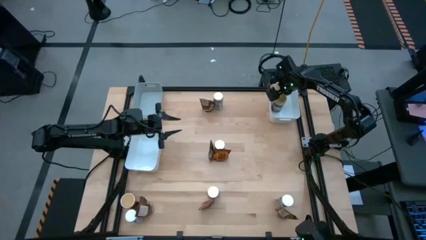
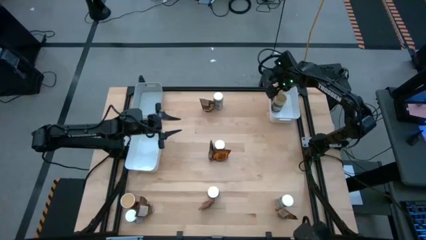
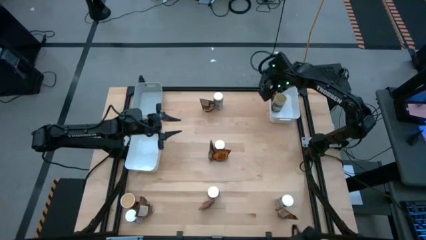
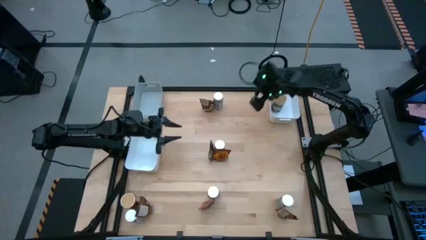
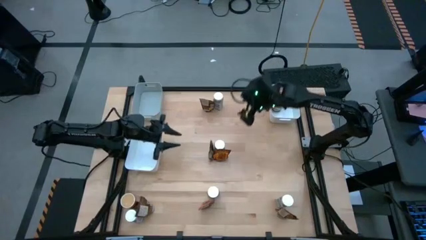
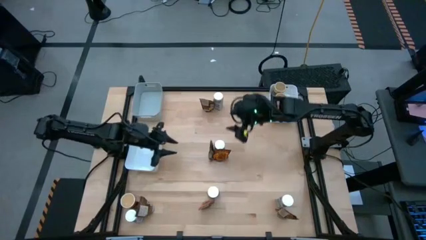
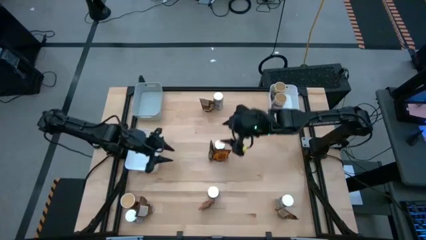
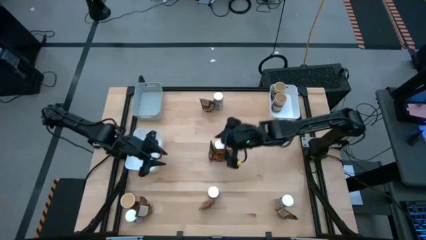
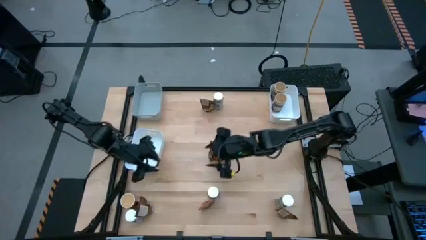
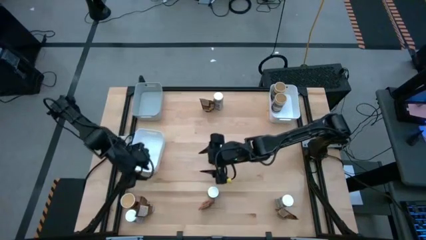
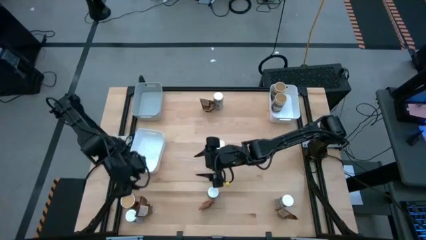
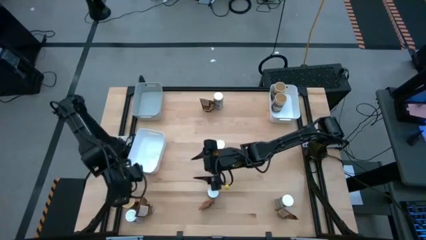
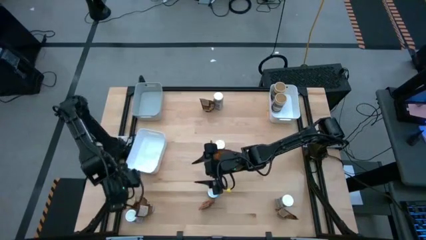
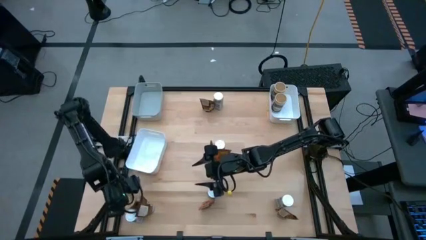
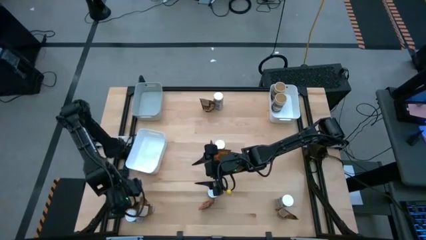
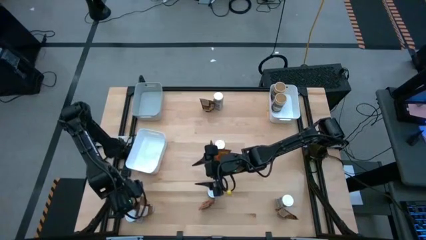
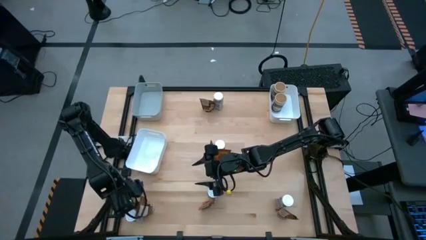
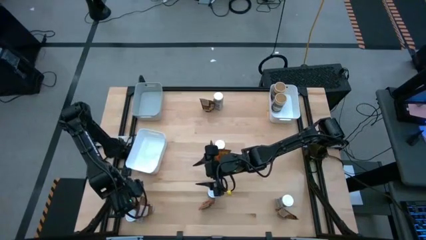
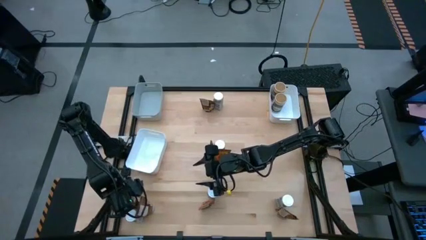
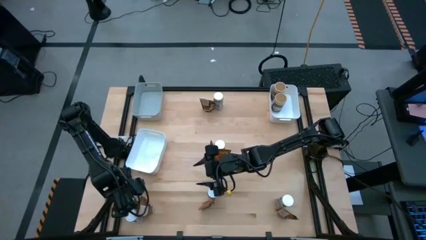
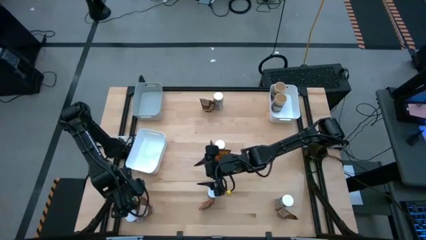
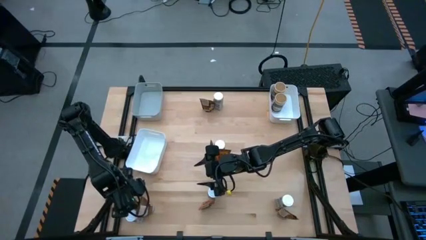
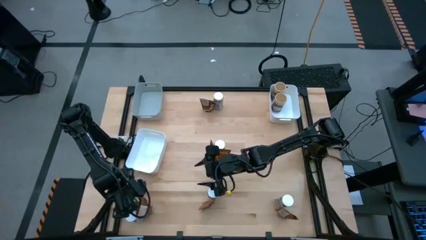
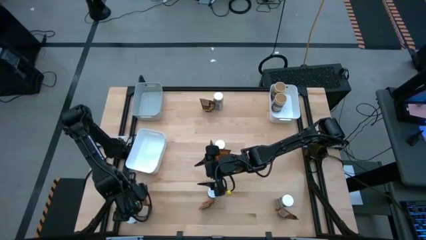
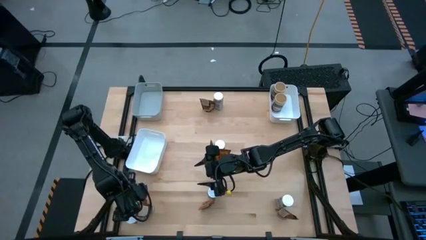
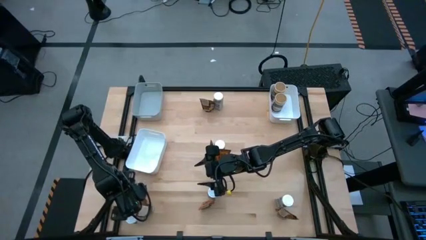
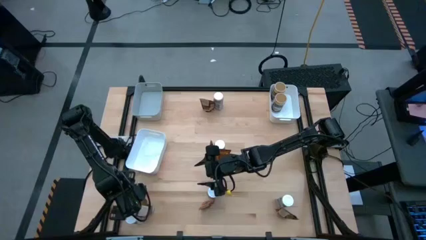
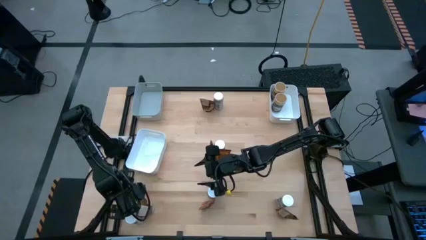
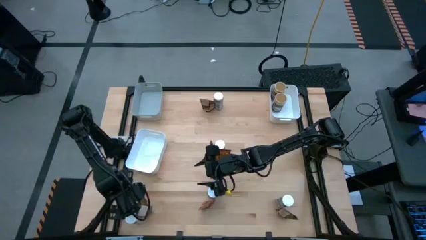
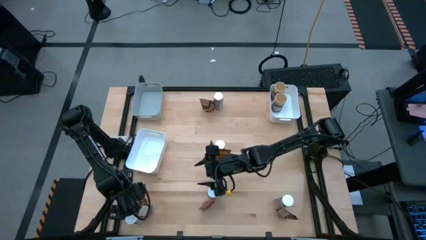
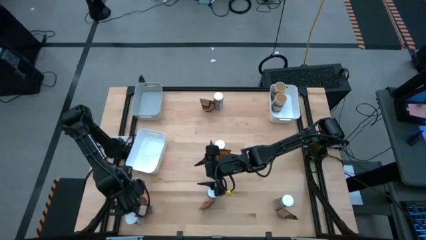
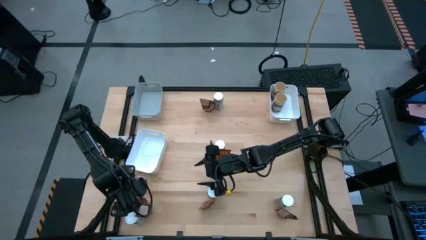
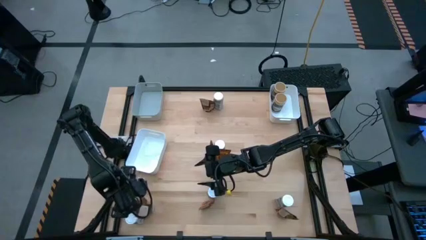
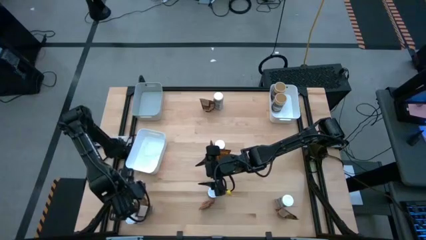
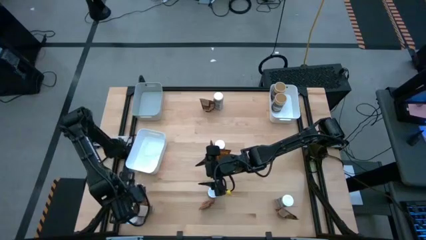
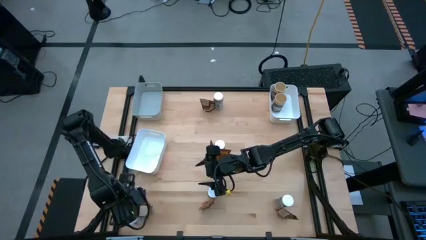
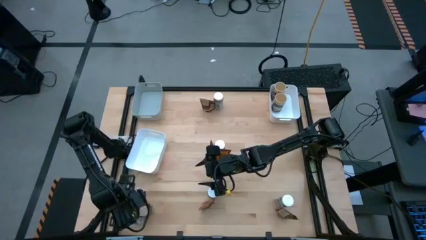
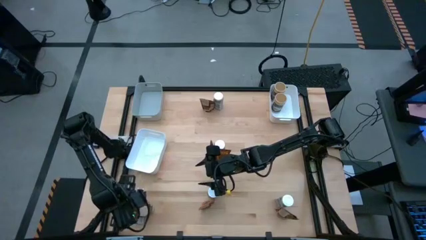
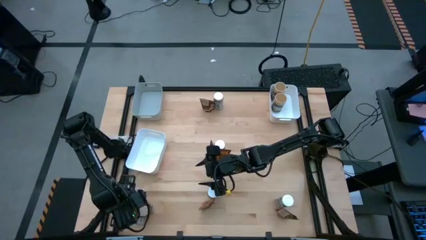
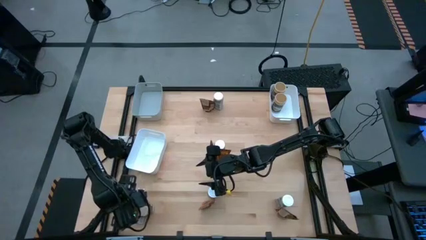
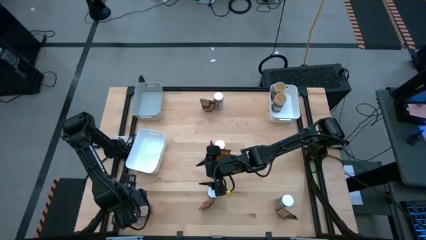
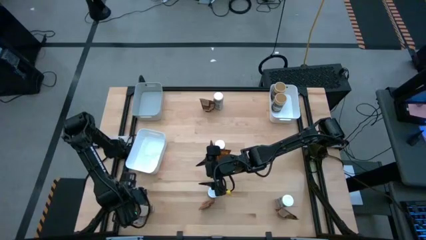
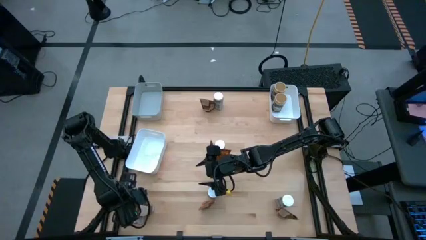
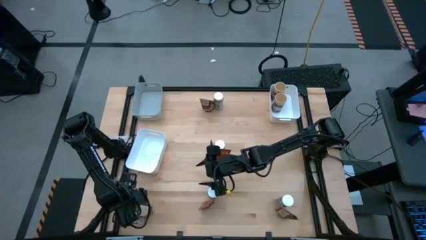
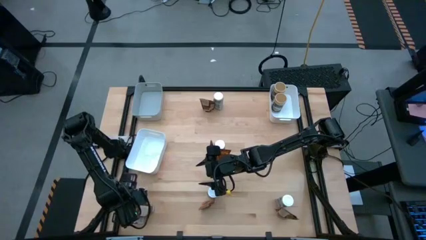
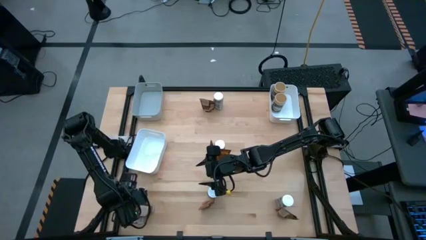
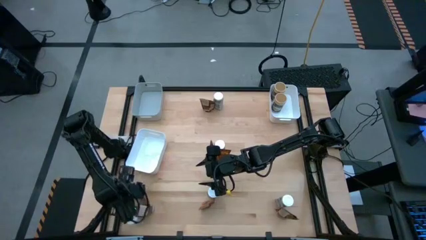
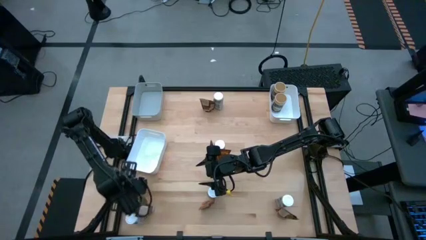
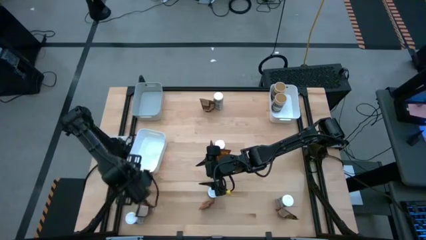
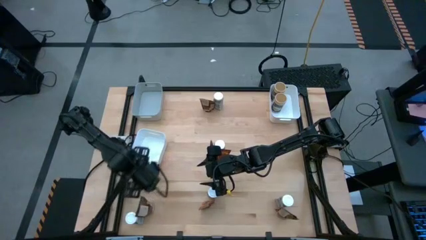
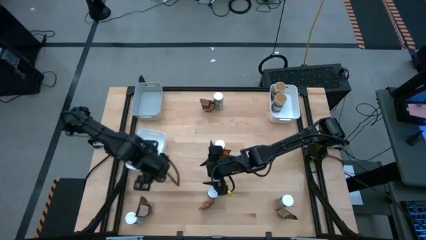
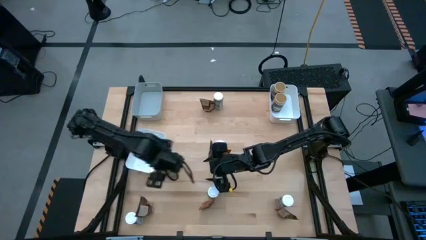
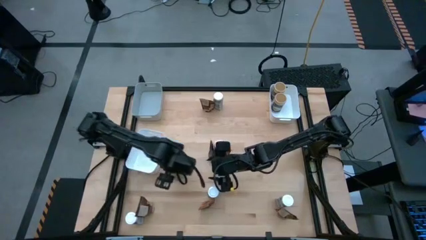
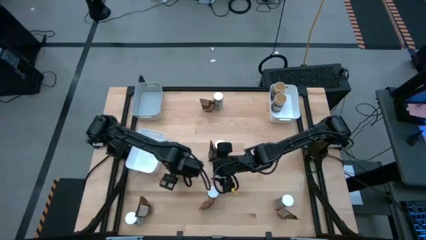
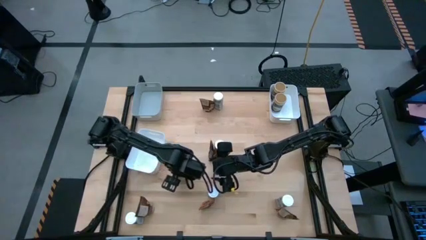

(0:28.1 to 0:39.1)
Task: Sort spices by type
Put the gold seasoning bottle into the right white bin
